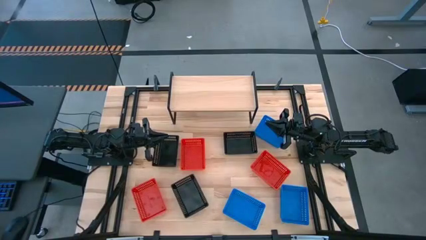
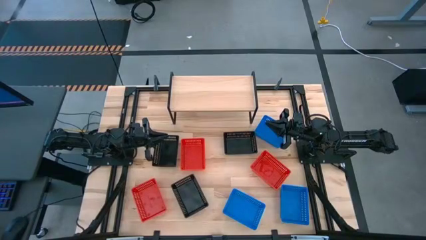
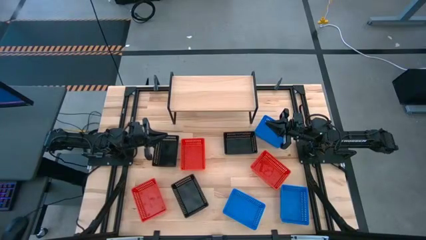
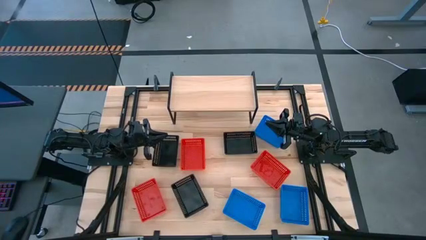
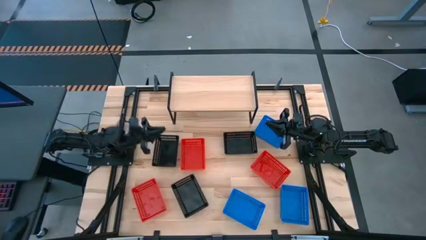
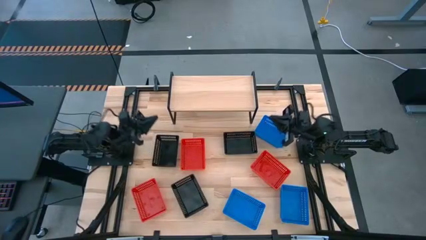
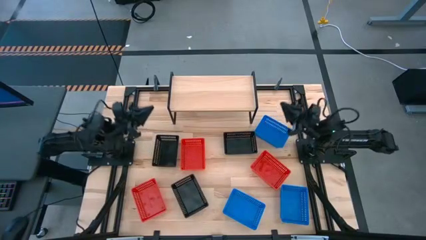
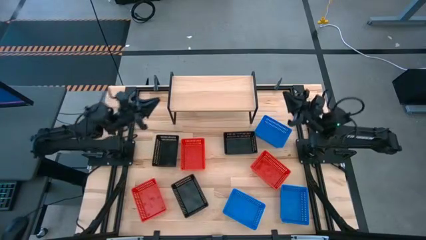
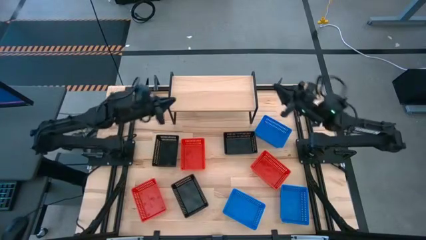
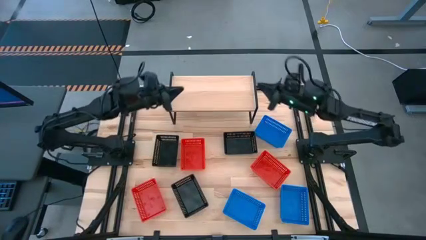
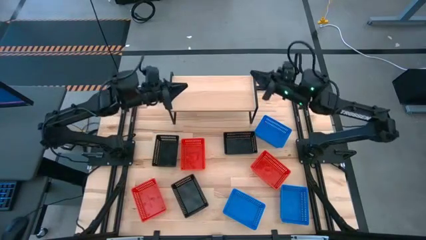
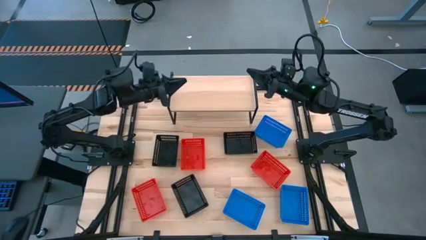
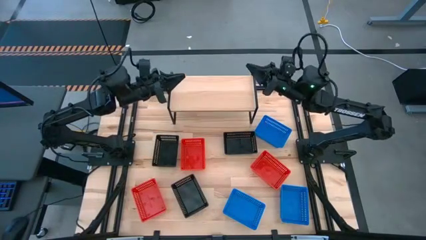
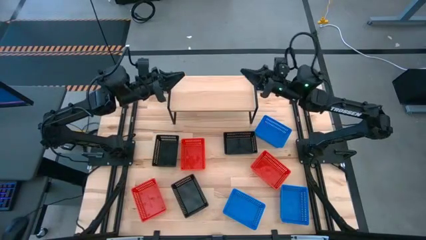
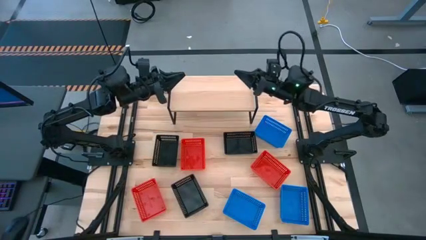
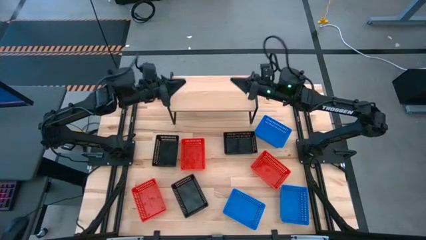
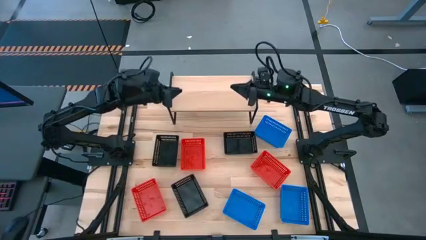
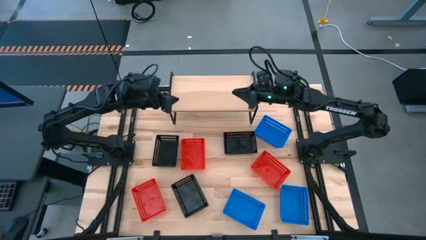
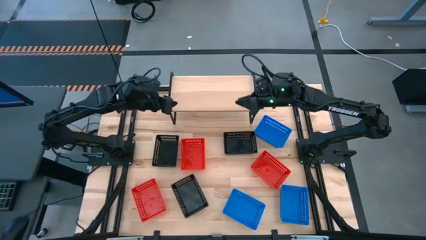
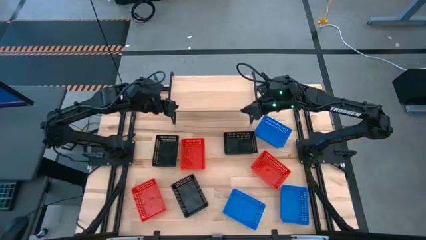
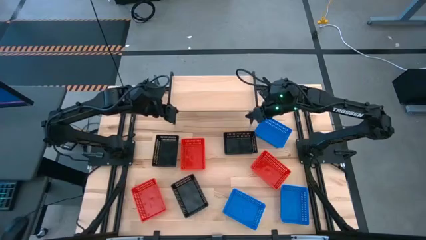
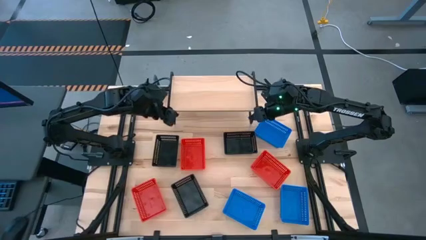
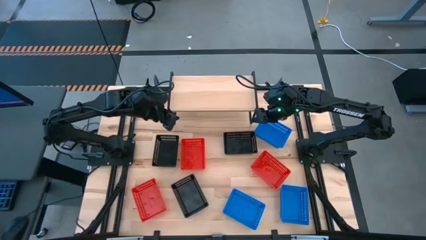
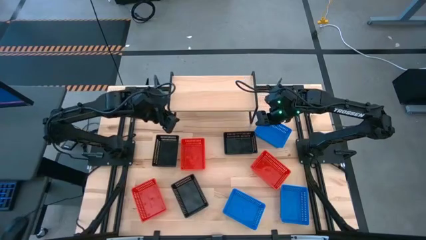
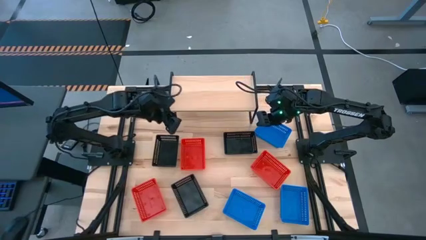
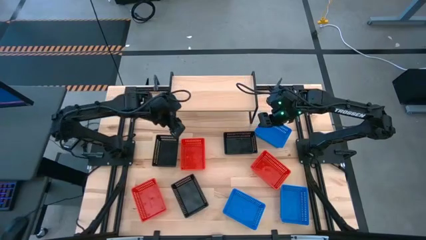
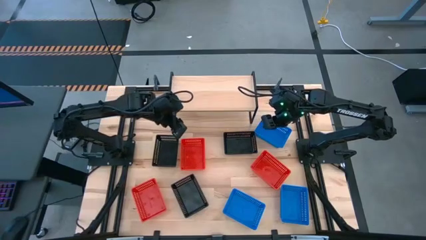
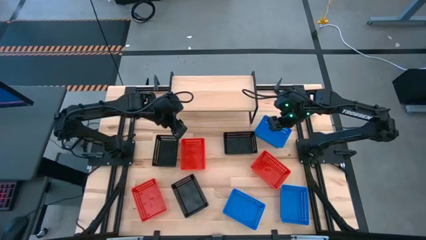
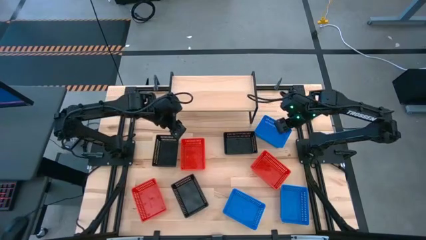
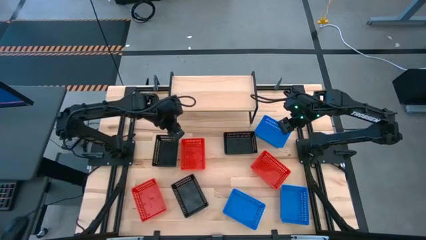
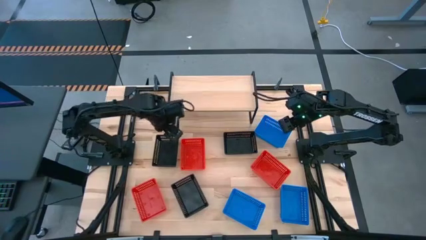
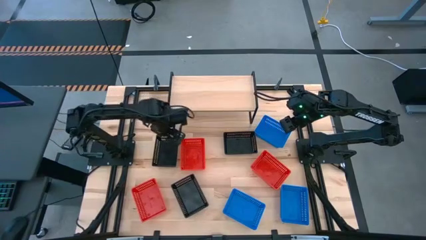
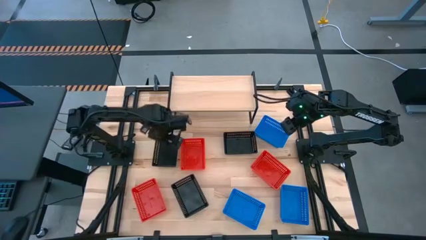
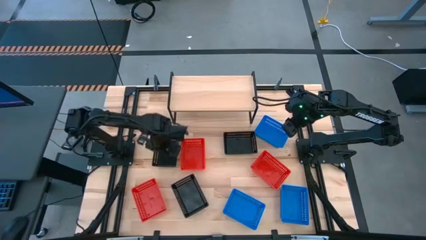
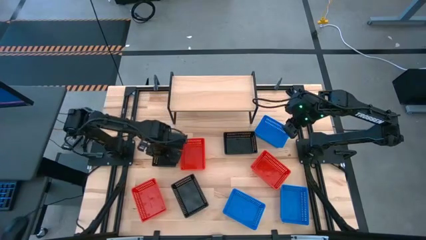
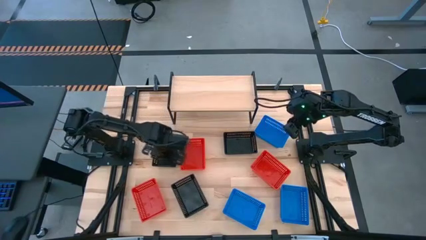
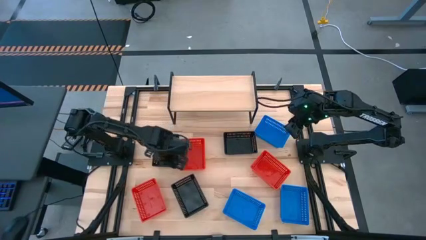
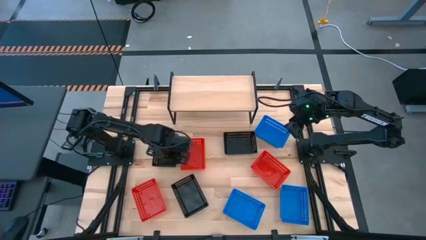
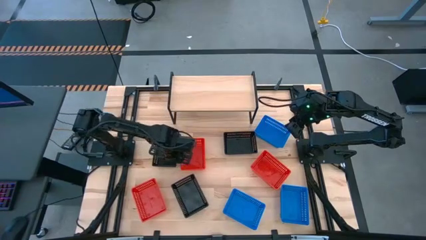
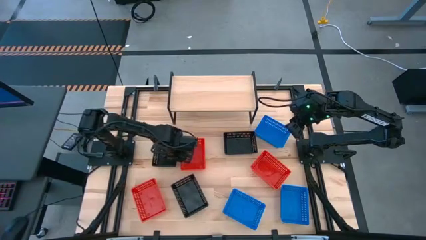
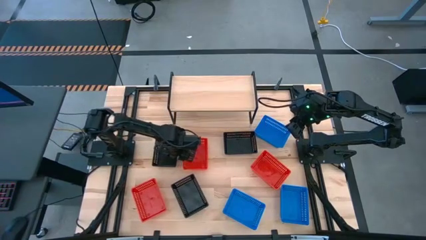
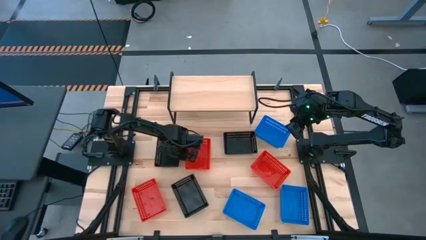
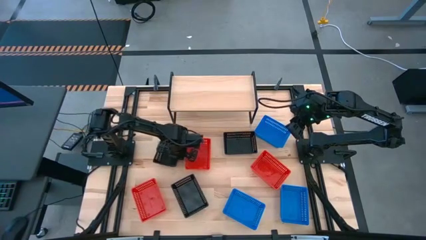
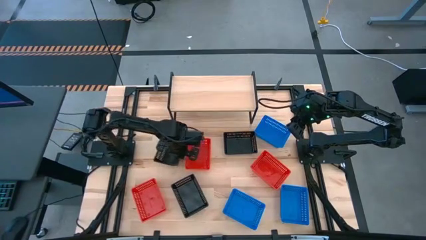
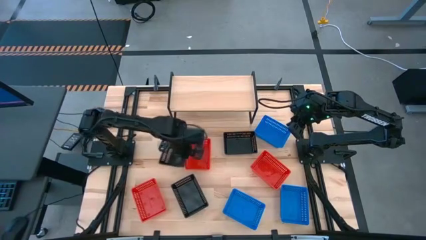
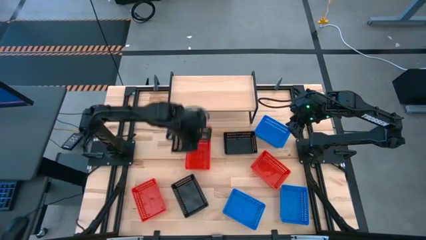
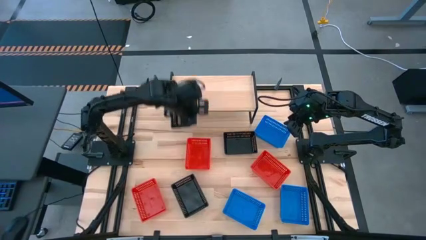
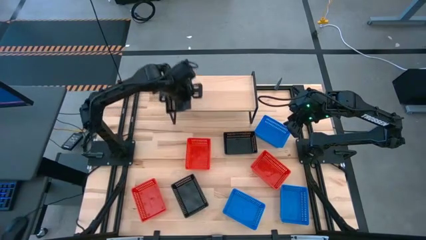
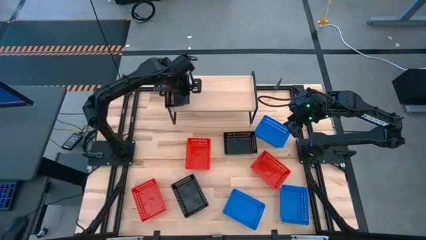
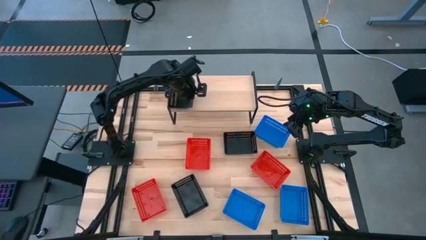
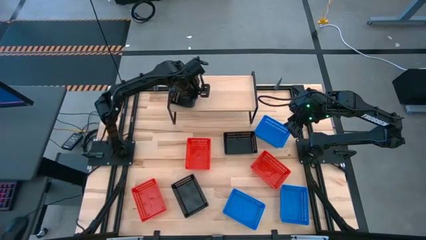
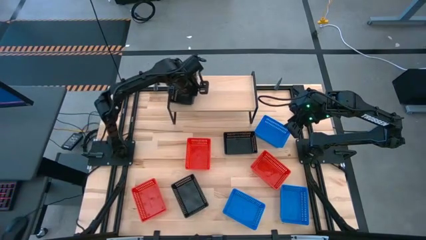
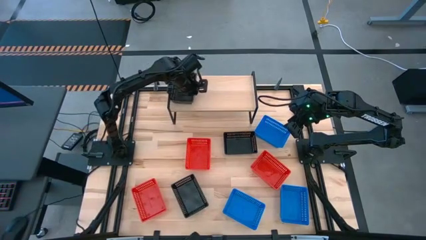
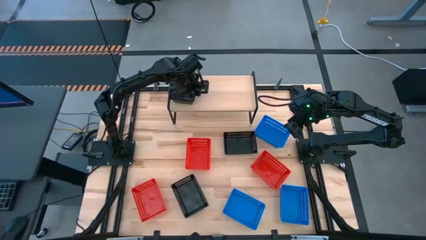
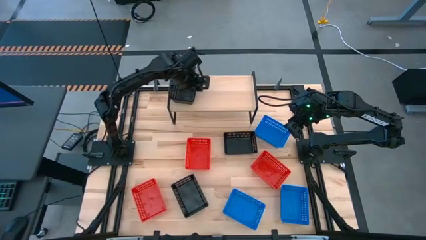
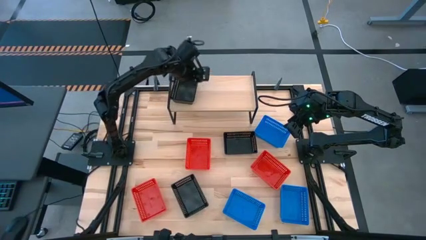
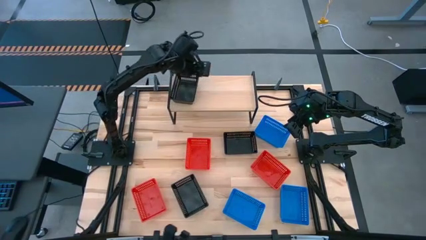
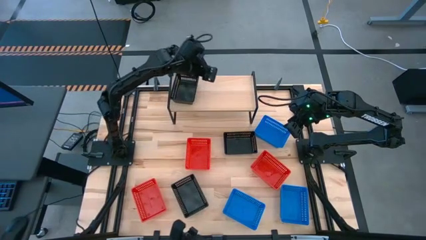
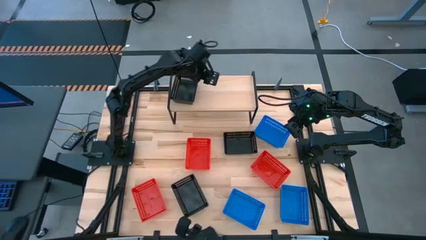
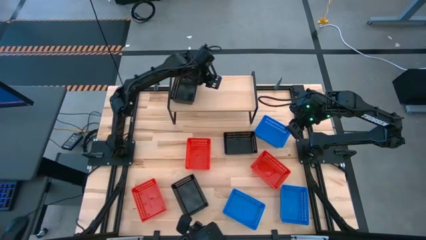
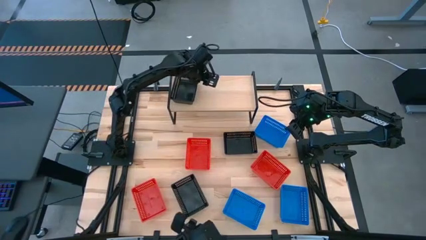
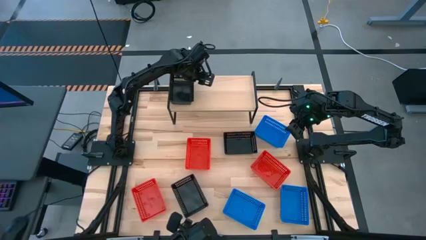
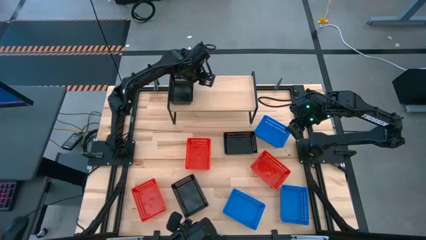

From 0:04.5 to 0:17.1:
Task: Stack baskets on shelf by color
Put the top left black bin on the shelf

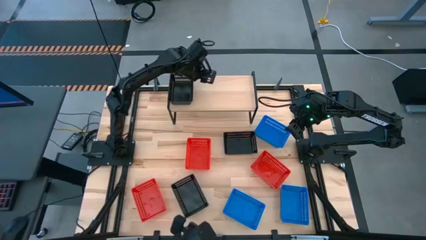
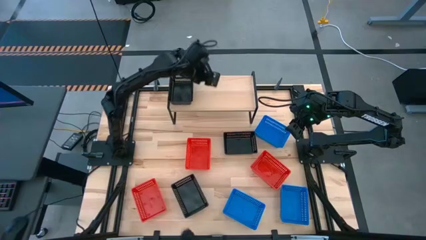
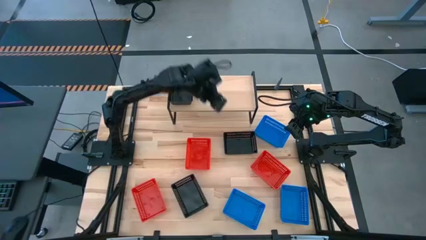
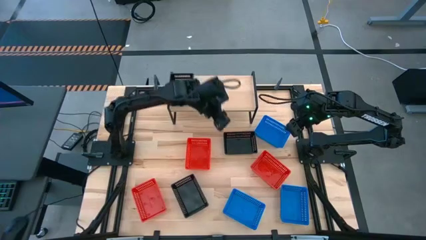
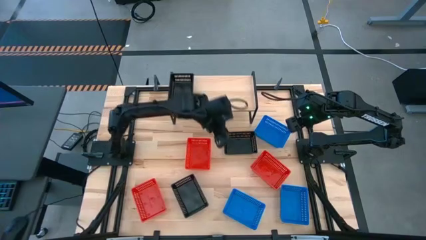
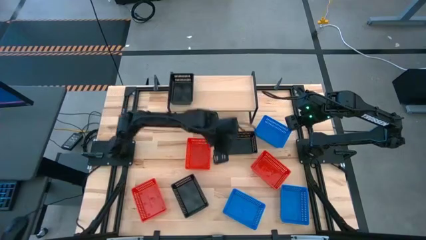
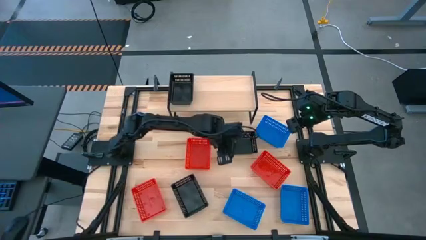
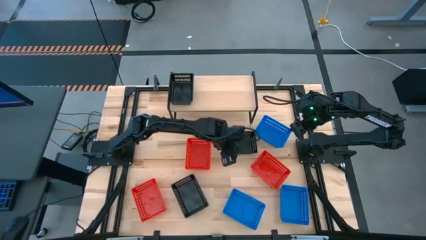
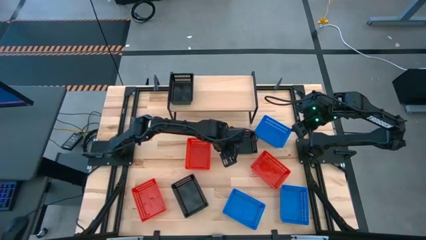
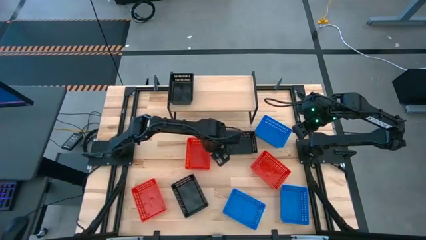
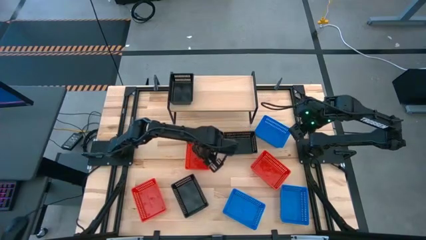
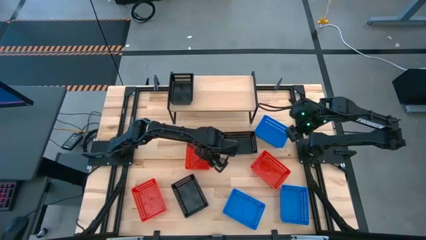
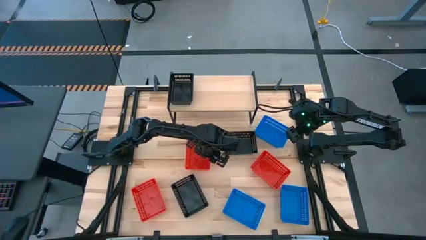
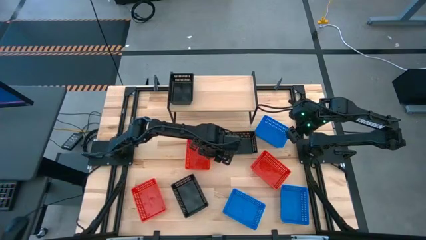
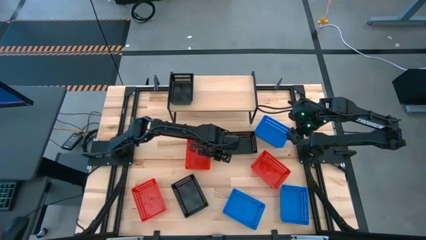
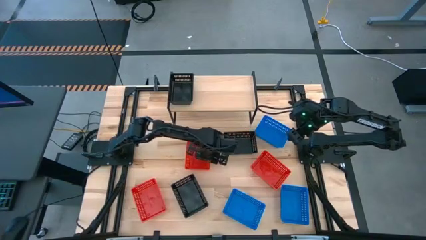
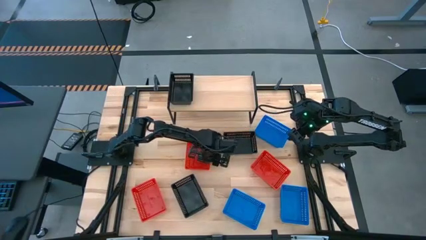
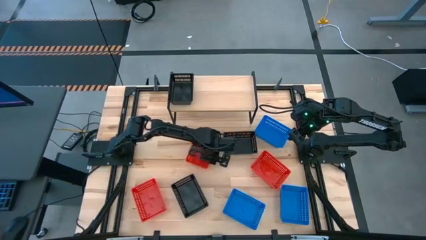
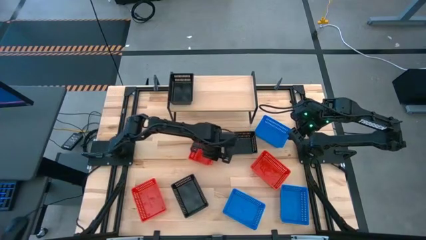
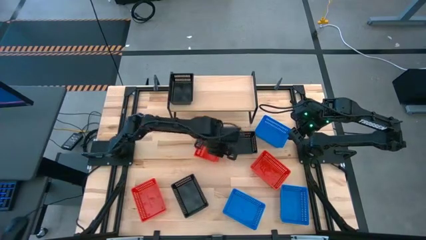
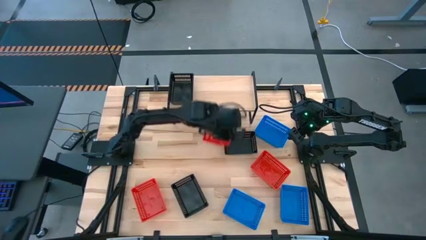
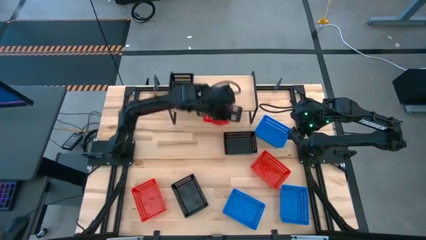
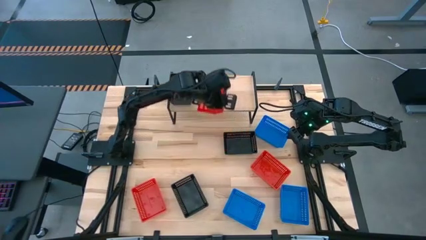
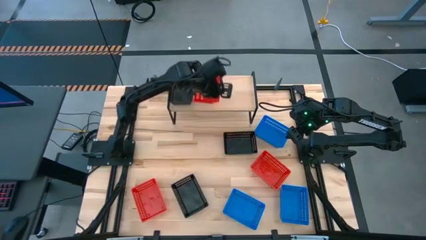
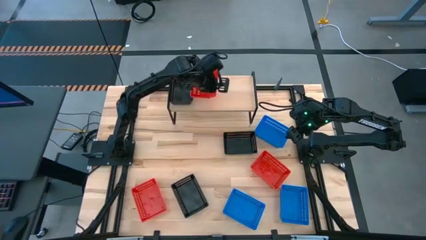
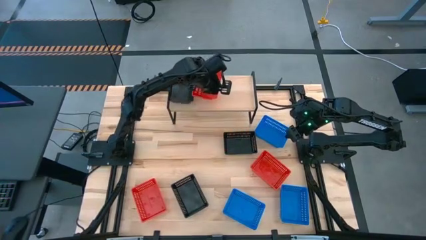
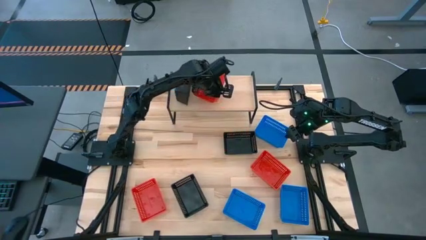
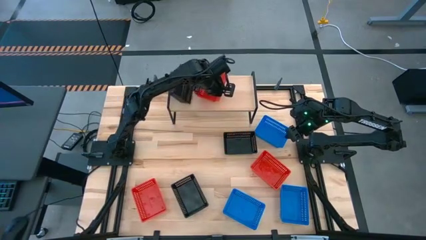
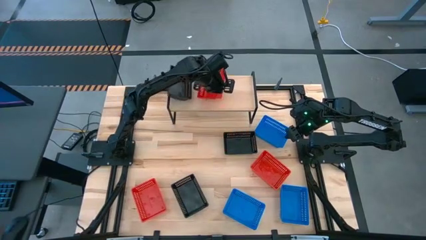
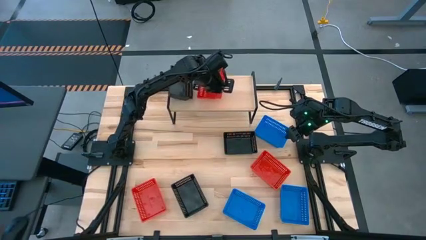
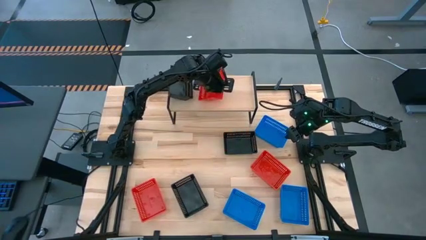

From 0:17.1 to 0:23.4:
Put the top left red bin on the shelf
